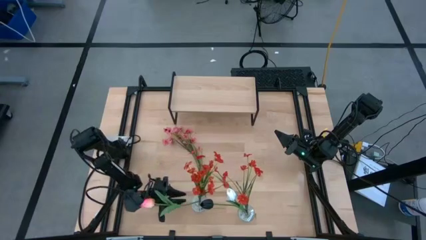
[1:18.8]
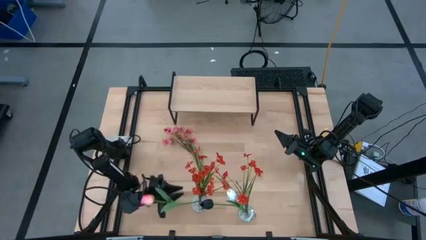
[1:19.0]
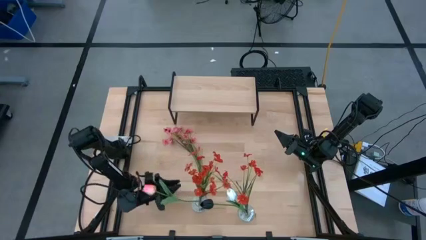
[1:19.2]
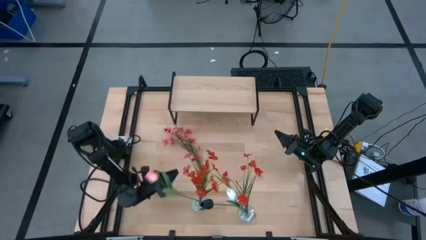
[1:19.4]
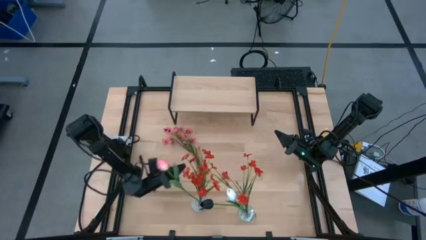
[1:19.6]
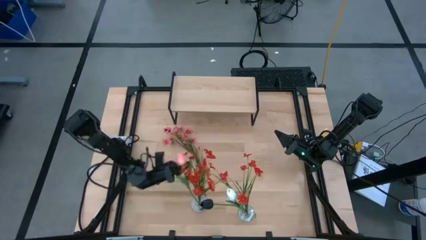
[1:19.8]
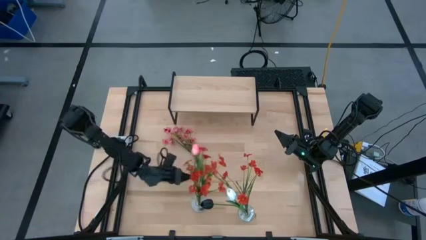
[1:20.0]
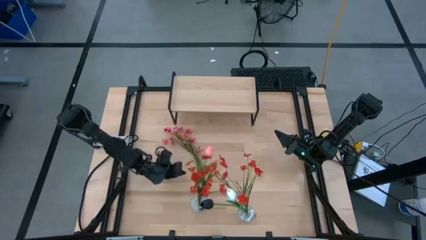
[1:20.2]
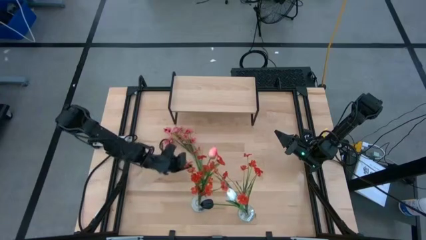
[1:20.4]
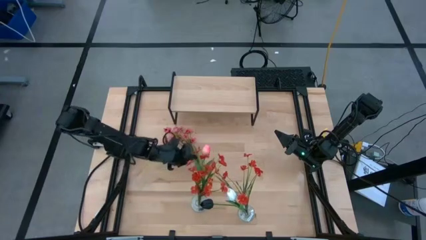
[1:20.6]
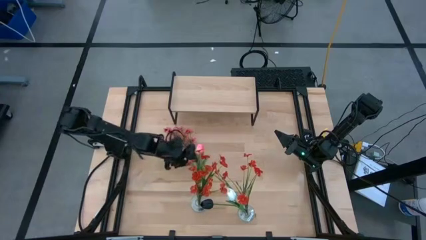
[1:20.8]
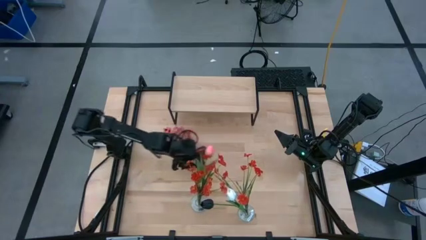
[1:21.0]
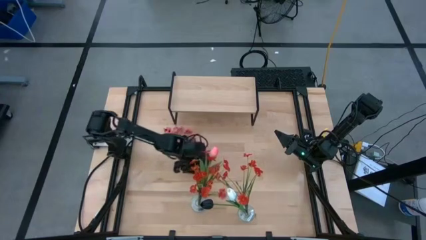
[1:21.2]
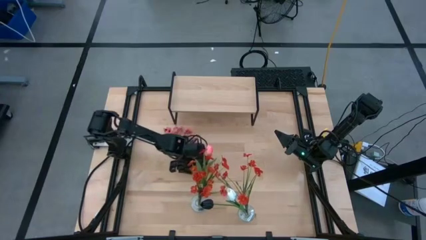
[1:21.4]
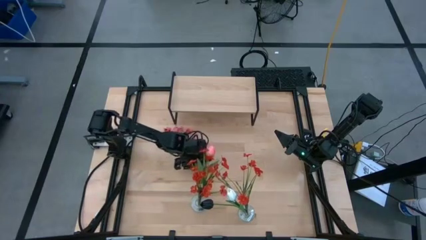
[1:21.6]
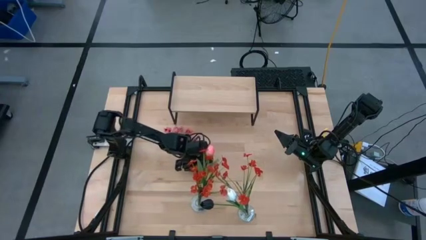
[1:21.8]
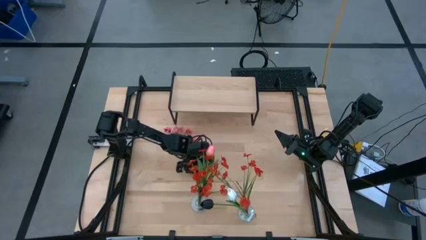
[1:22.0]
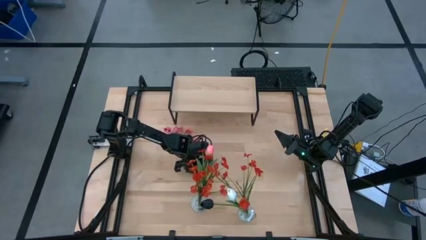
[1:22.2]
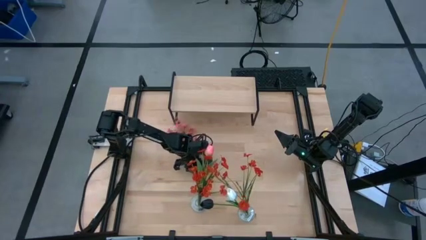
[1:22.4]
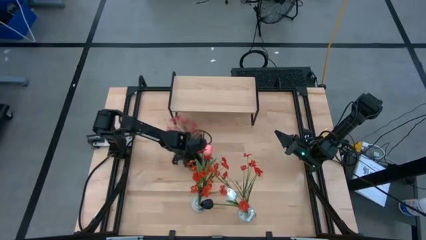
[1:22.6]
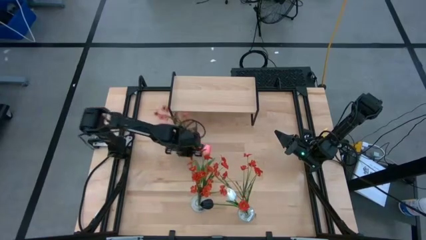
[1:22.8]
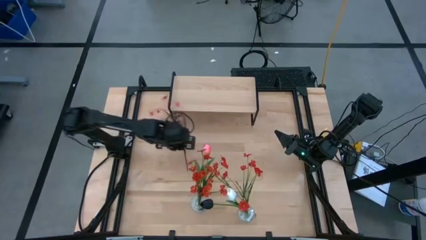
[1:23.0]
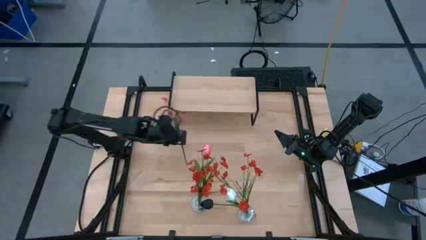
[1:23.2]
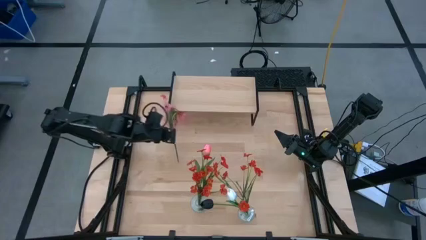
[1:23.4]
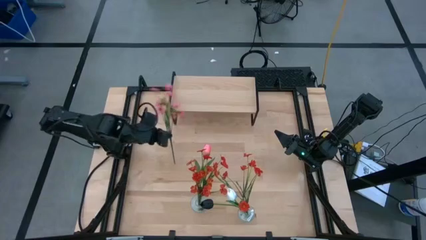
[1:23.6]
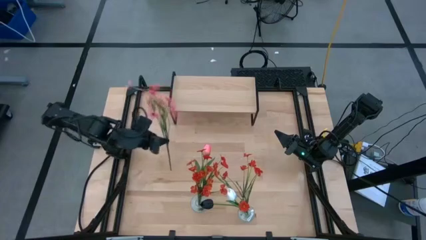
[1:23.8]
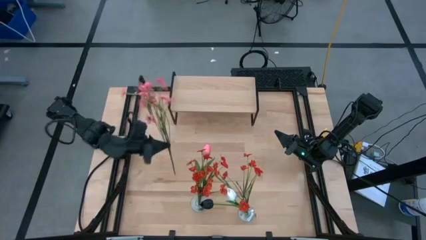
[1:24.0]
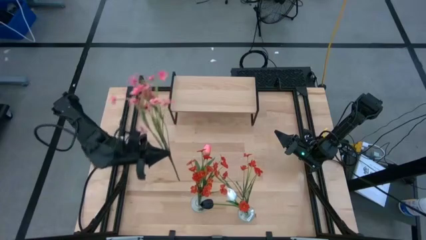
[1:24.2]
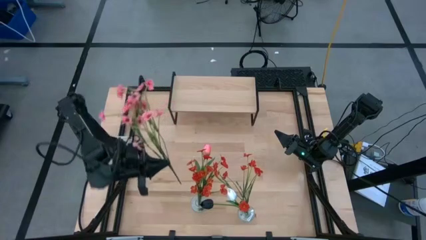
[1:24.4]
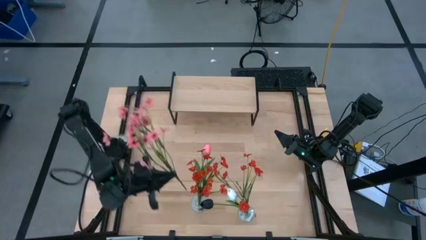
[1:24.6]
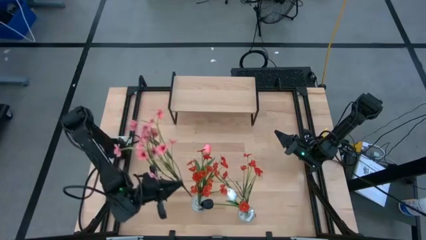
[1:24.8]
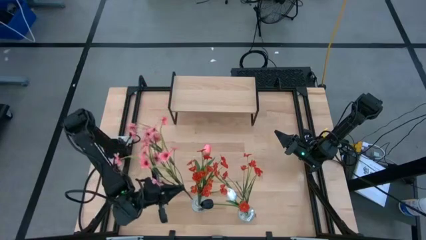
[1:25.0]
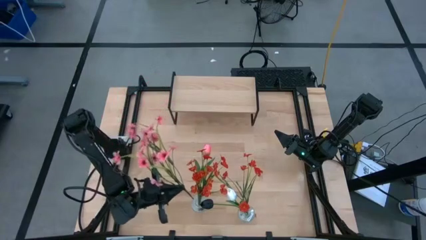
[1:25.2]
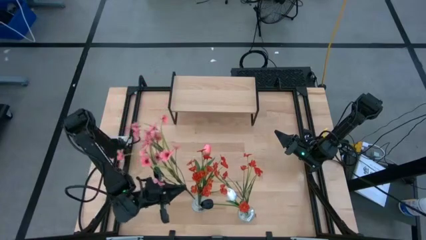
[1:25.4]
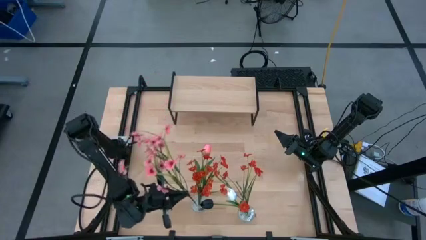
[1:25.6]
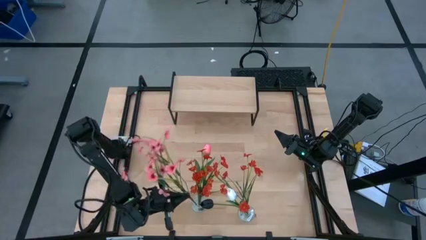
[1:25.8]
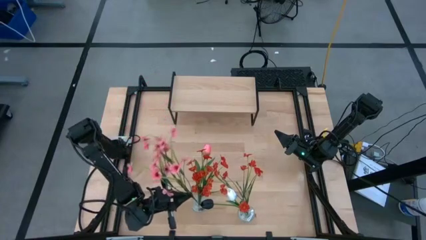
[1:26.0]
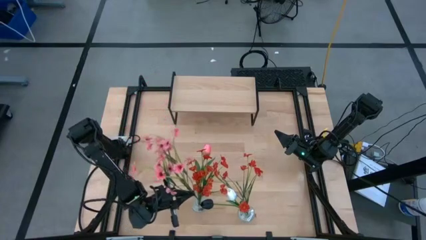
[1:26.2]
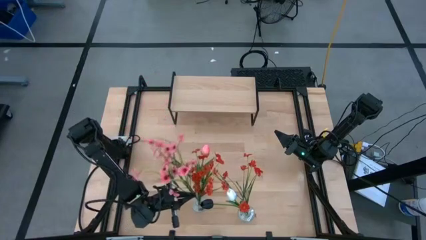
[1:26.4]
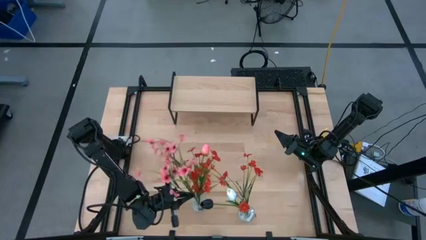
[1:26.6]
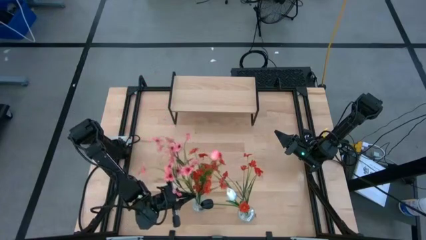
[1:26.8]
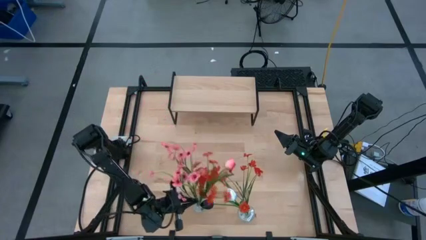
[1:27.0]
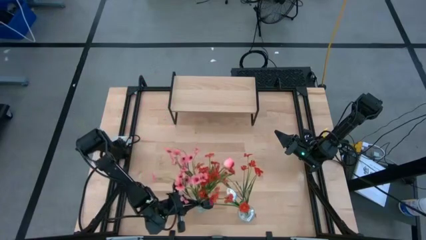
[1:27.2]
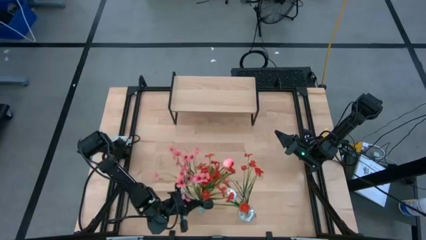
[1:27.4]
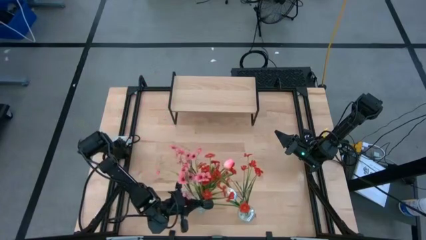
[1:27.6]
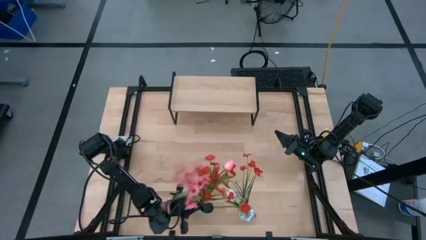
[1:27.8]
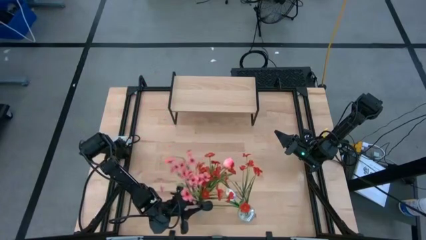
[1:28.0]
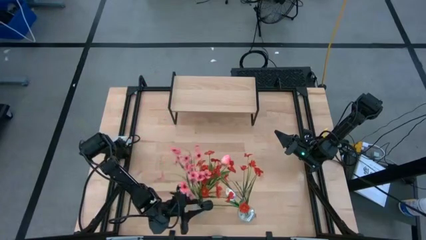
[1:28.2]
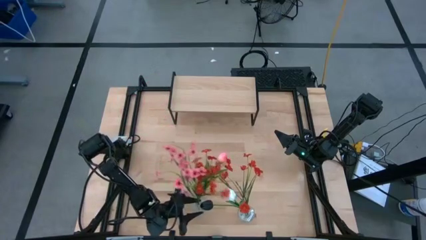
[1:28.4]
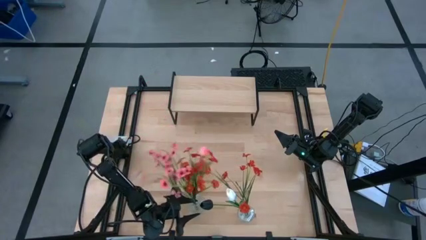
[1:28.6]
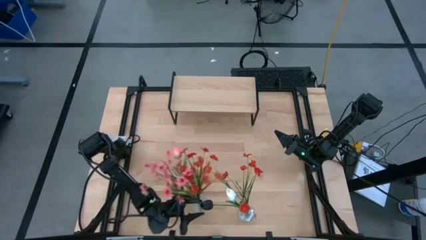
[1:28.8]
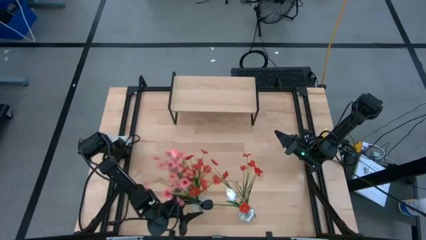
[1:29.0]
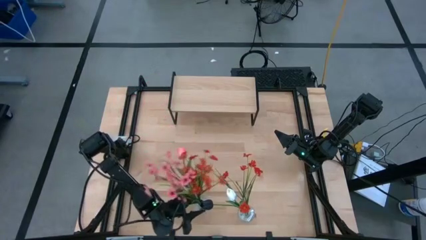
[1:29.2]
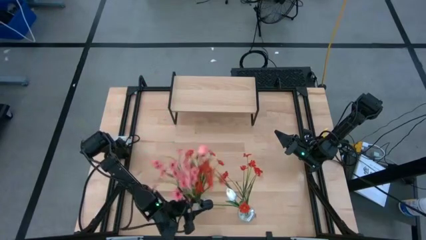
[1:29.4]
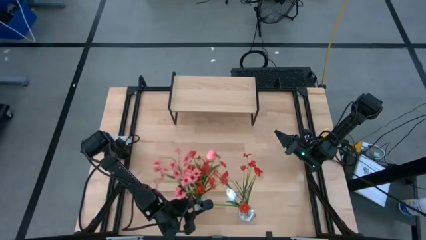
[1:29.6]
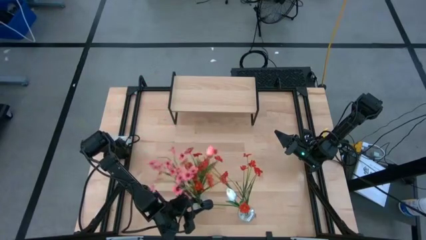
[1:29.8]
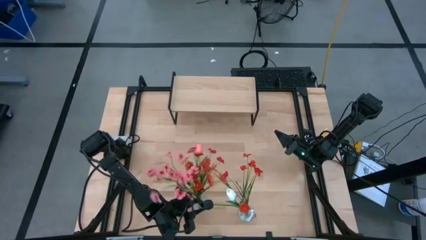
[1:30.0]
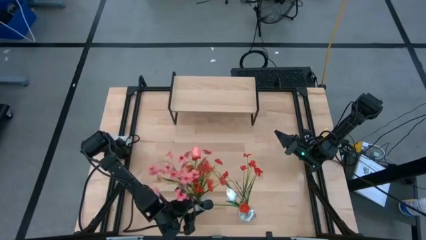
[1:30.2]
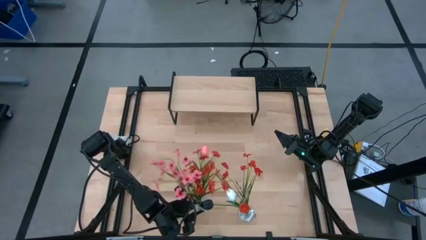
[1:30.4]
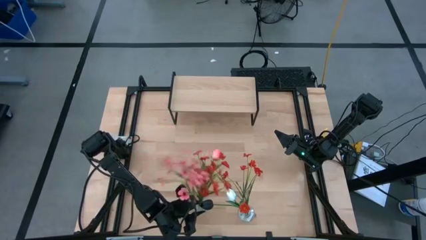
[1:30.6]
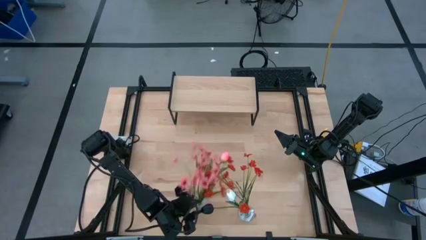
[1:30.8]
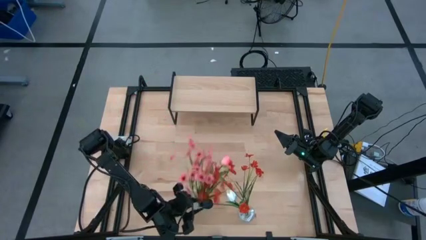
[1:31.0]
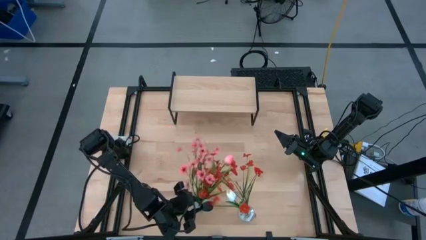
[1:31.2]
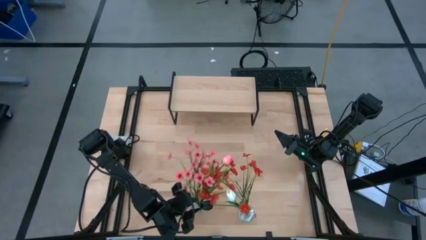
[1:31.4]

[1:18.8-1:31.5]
Task: Pick and place flowers into a vace then onto a shelf
Put the pink flowers into the left transparent vase

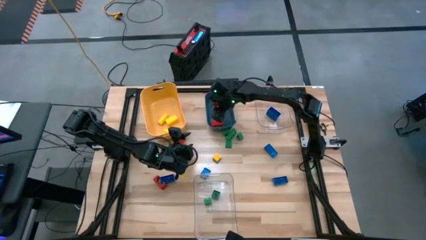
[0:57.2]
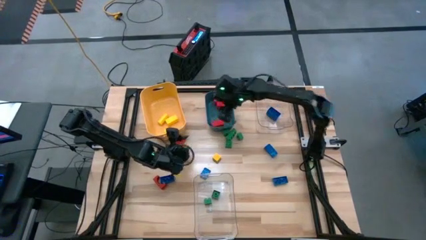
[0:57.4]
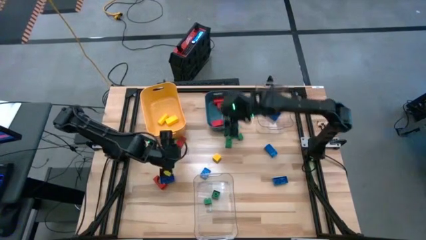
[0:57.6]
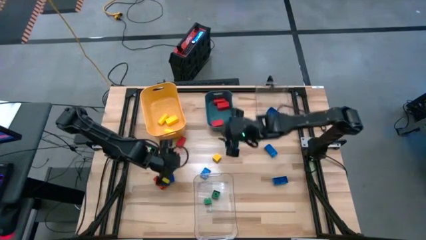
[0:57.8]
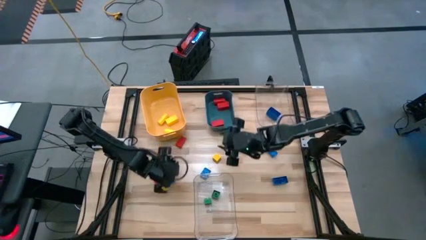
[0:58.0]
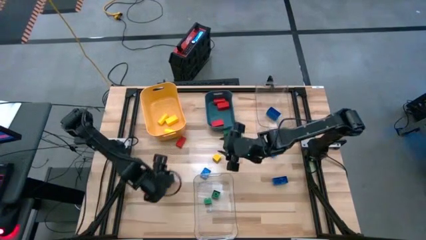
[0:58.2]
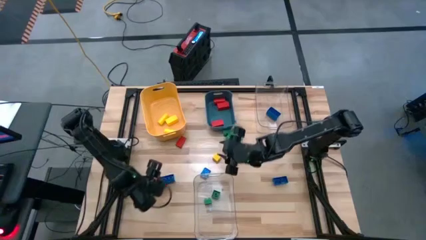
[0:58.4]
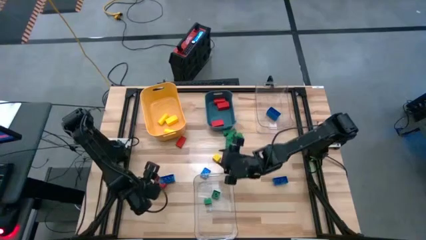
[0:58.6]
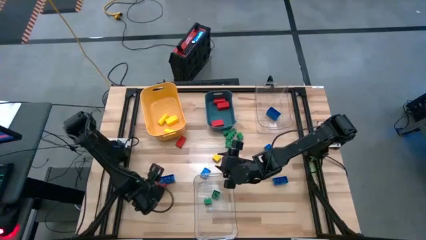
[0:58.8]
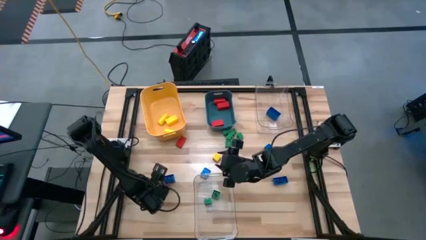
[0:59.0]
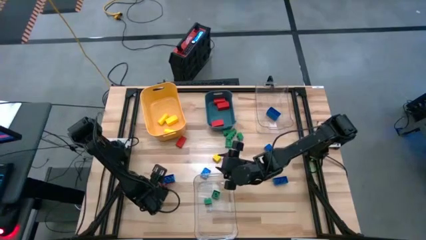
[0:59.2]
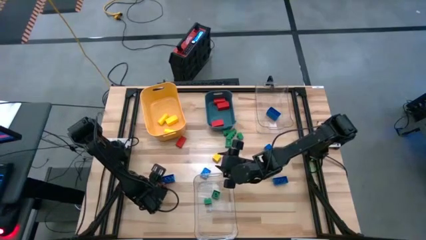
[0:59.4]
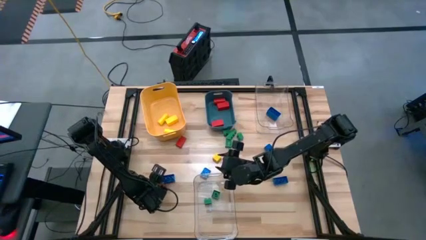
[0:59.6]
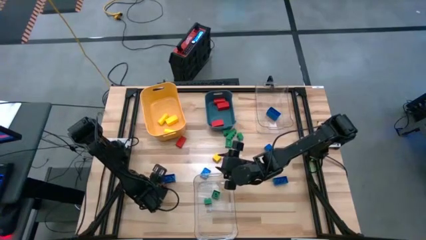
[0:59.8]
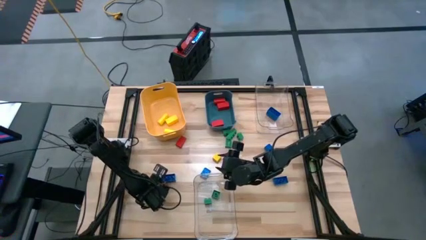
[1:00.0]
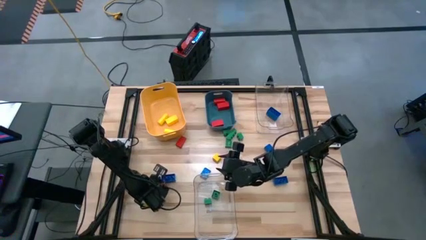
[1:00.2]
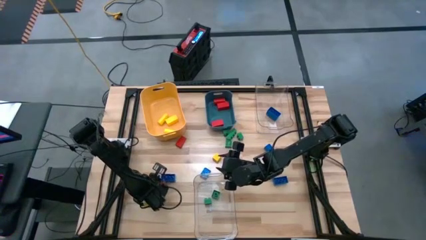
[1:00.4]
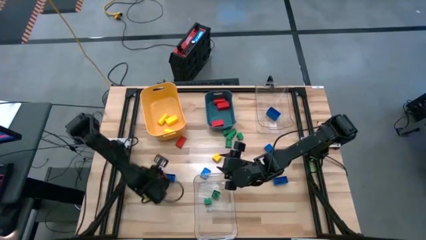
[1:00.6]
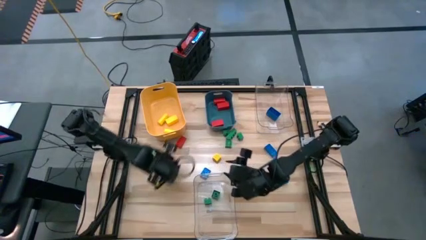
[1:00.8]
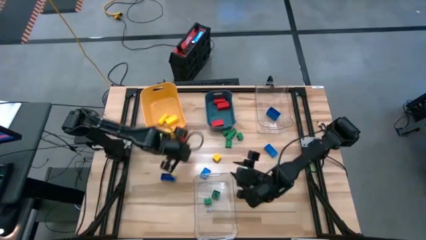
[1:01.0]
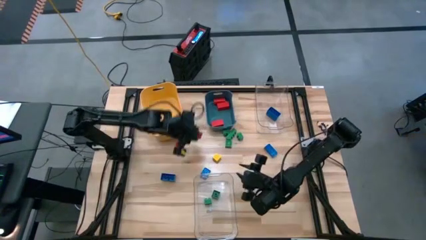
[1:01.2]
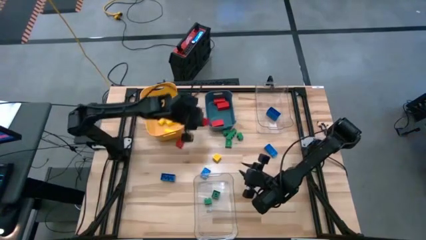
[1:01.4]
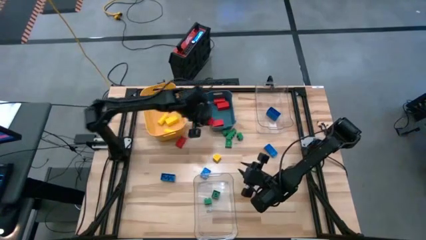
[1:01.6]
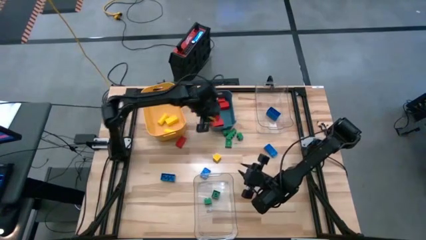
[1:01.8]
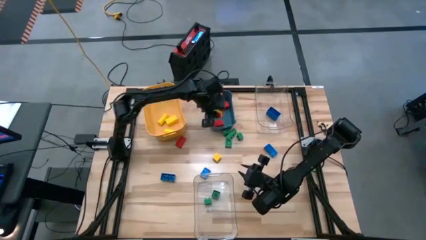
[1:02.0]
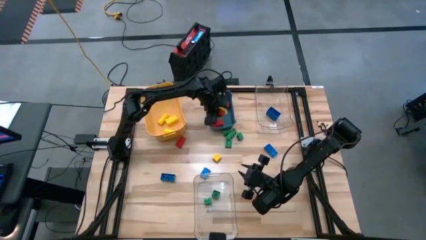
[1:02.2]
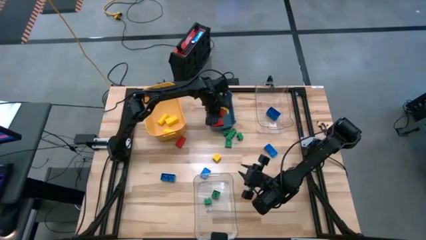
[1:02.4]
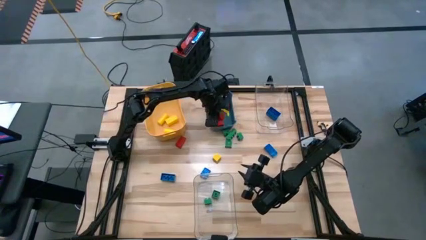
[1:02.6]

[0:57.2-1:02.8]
Task: Sort blocks
Put the red wooden block into the blue bin
